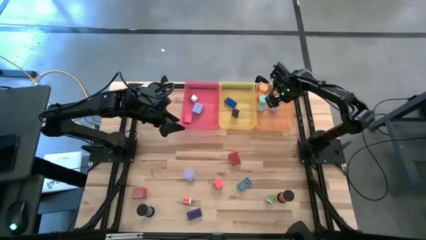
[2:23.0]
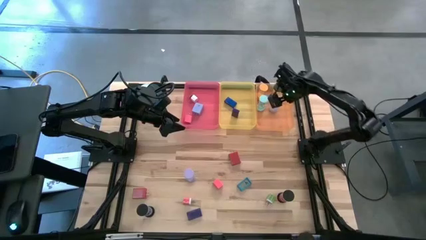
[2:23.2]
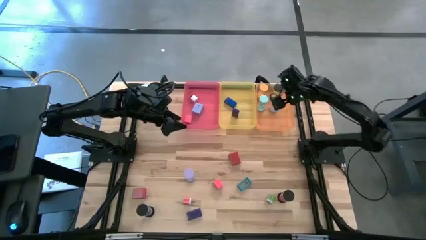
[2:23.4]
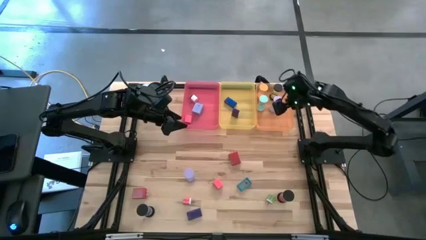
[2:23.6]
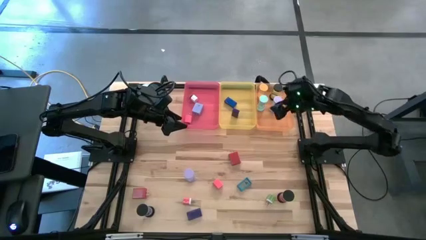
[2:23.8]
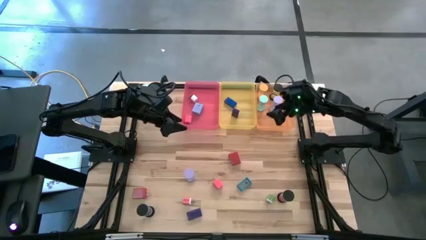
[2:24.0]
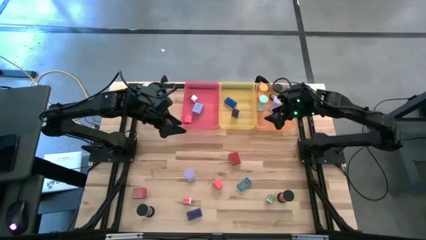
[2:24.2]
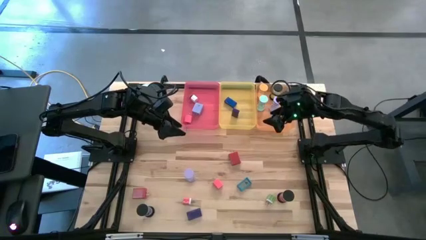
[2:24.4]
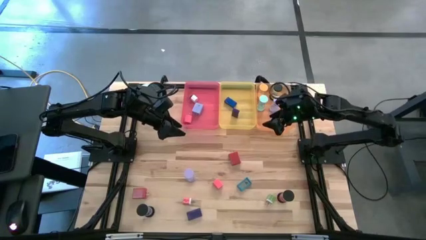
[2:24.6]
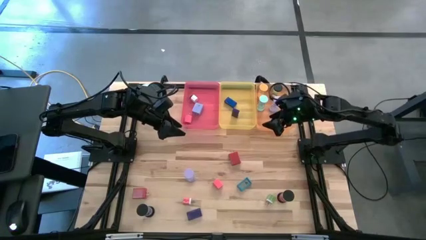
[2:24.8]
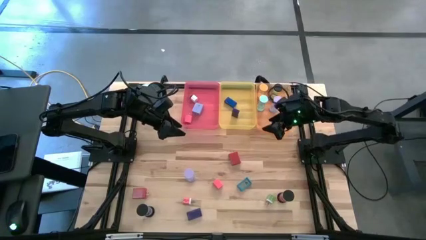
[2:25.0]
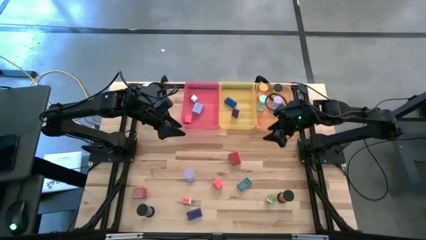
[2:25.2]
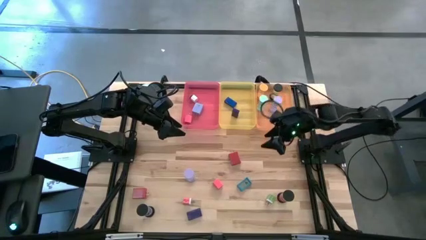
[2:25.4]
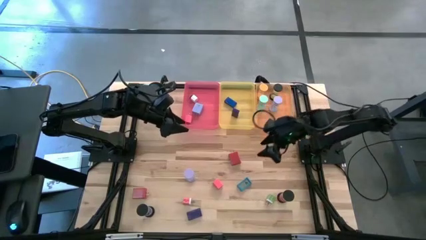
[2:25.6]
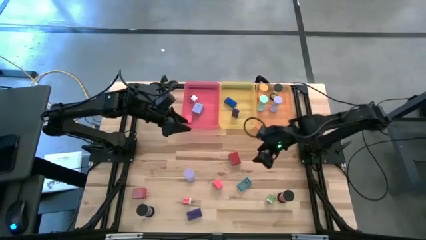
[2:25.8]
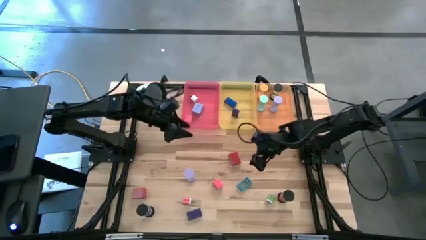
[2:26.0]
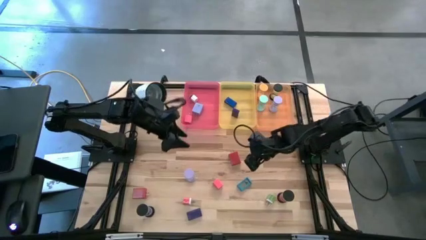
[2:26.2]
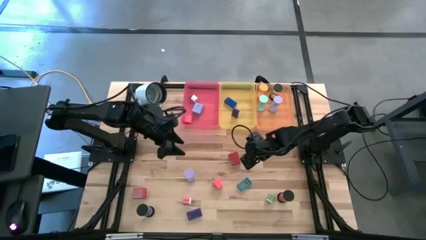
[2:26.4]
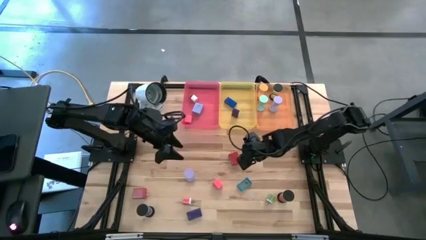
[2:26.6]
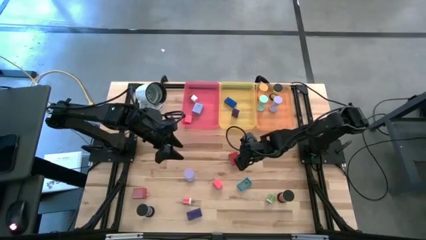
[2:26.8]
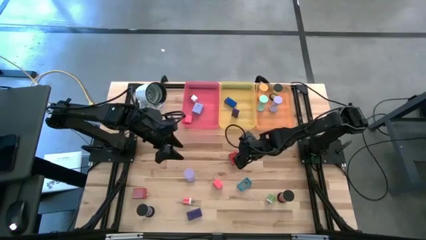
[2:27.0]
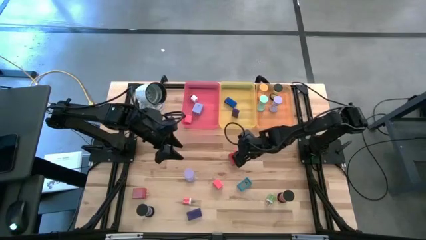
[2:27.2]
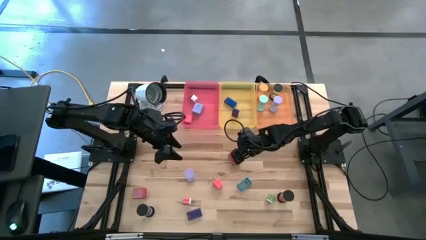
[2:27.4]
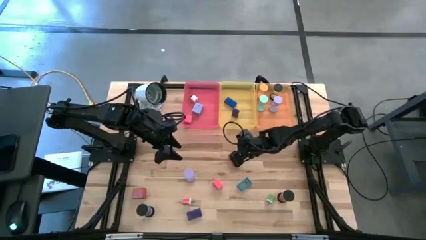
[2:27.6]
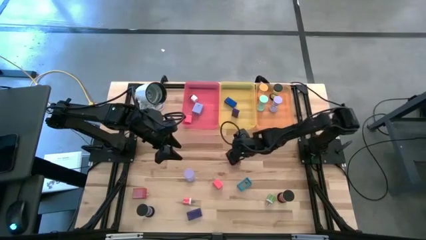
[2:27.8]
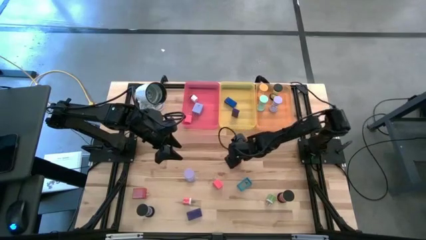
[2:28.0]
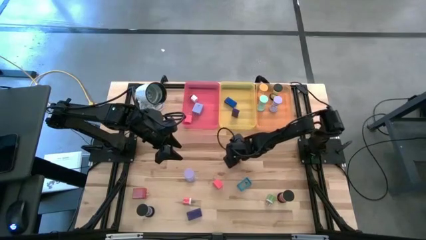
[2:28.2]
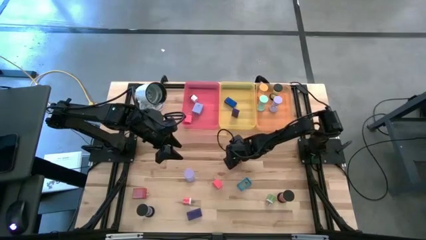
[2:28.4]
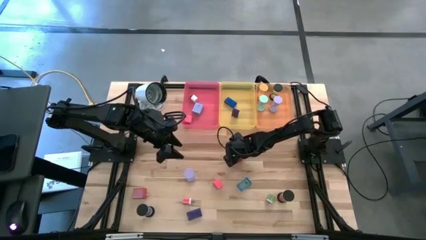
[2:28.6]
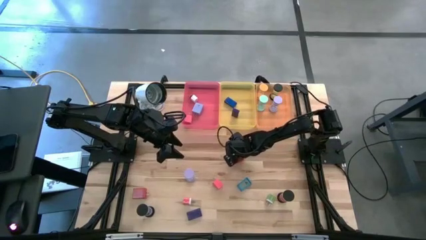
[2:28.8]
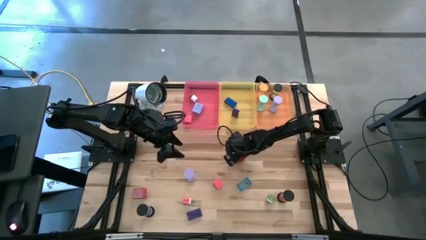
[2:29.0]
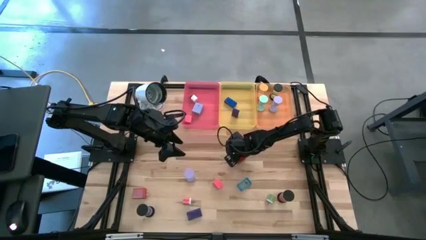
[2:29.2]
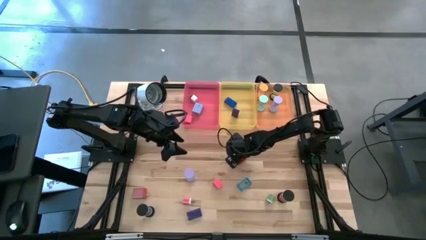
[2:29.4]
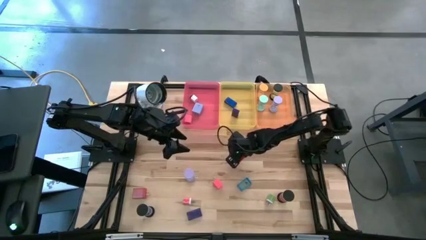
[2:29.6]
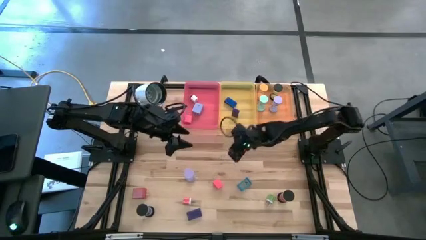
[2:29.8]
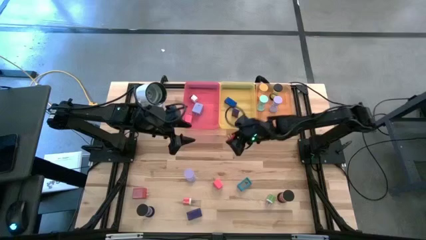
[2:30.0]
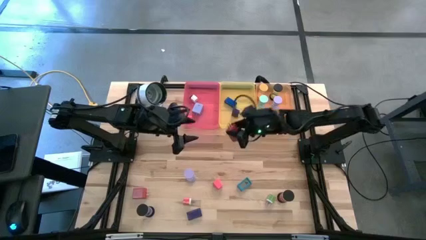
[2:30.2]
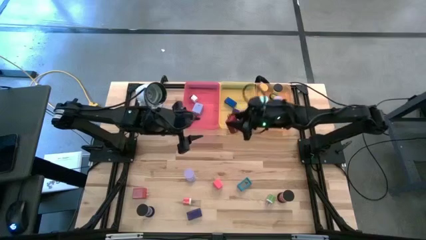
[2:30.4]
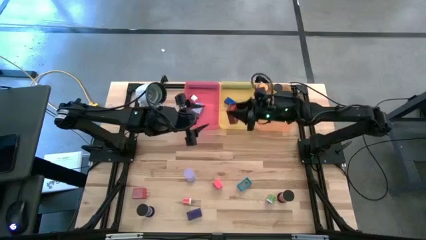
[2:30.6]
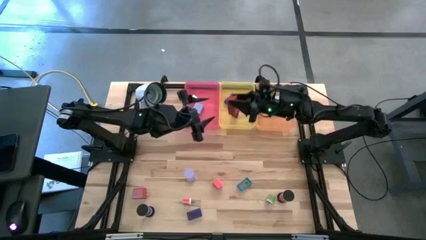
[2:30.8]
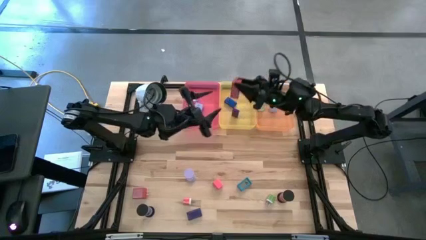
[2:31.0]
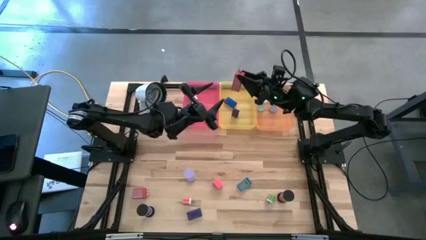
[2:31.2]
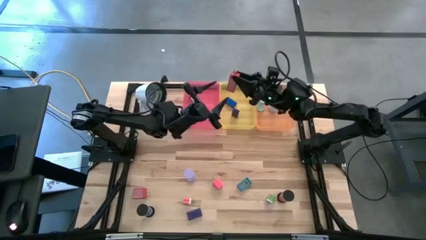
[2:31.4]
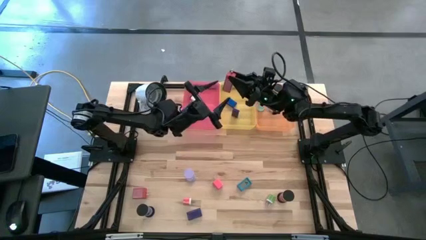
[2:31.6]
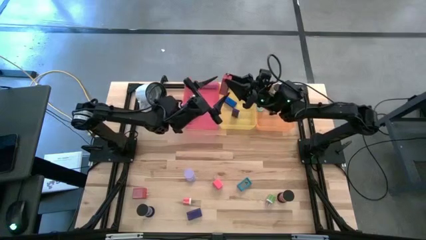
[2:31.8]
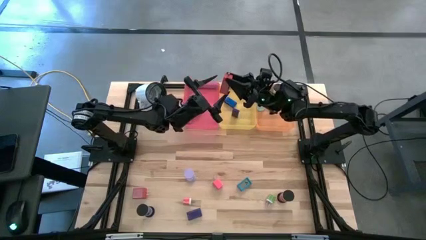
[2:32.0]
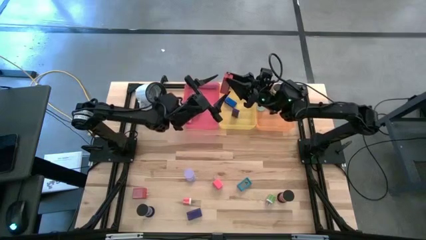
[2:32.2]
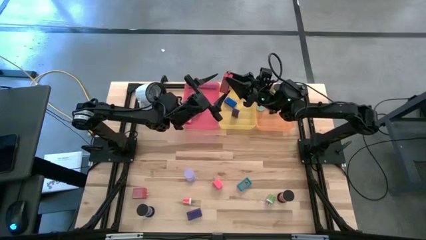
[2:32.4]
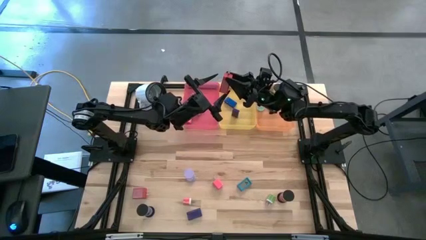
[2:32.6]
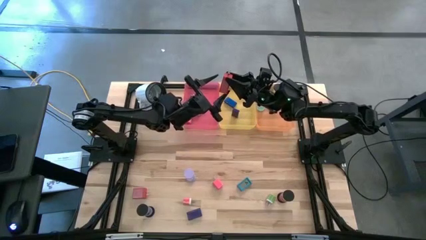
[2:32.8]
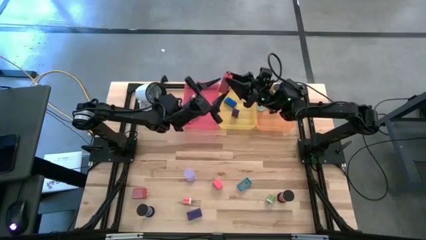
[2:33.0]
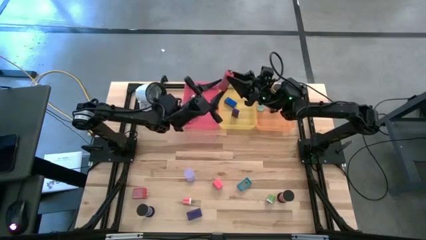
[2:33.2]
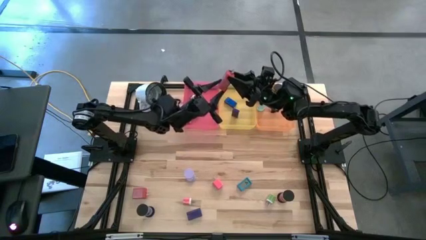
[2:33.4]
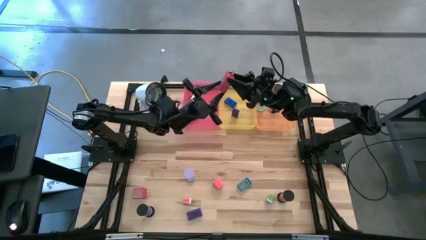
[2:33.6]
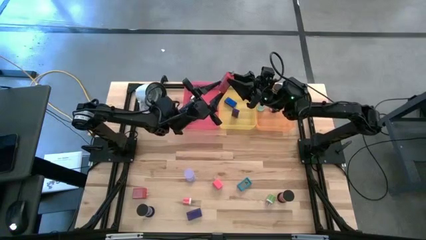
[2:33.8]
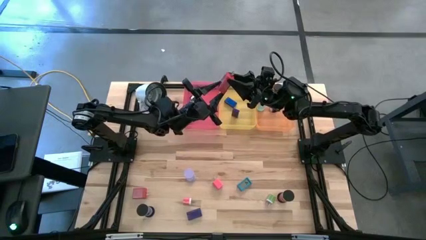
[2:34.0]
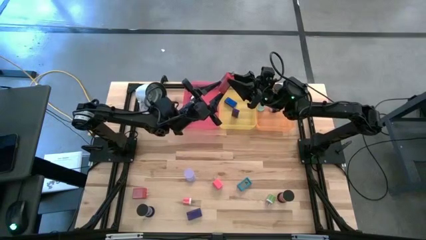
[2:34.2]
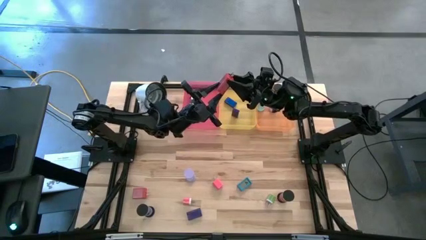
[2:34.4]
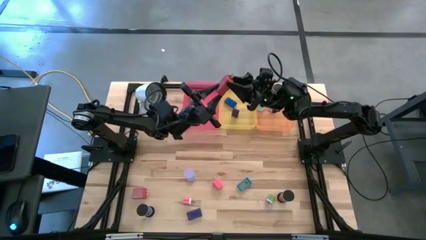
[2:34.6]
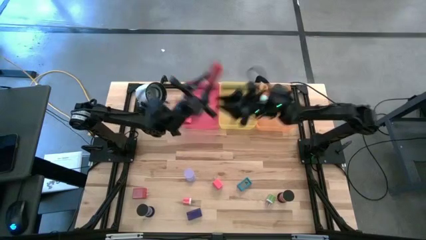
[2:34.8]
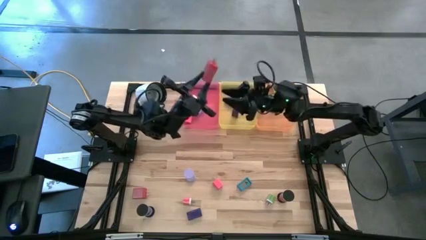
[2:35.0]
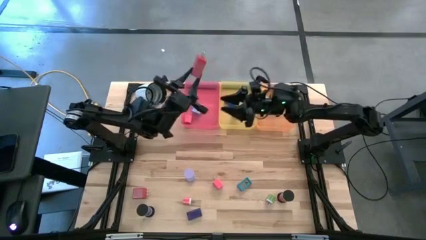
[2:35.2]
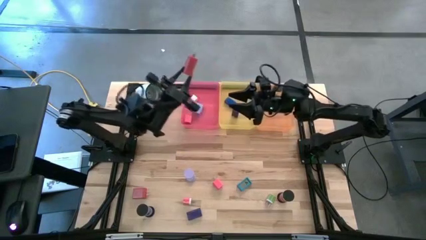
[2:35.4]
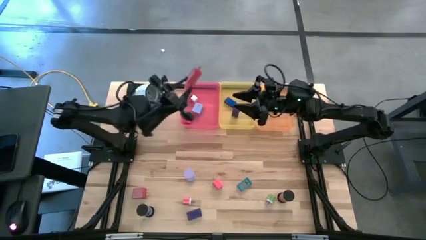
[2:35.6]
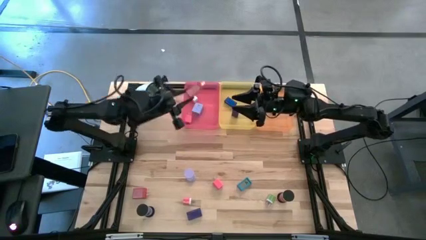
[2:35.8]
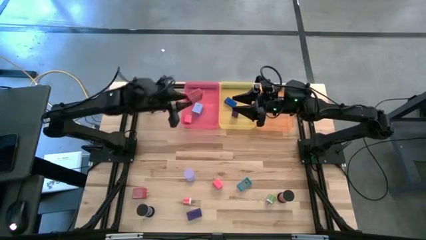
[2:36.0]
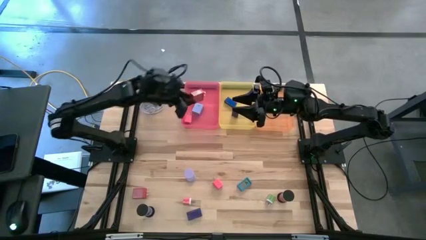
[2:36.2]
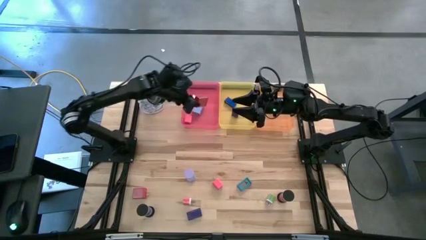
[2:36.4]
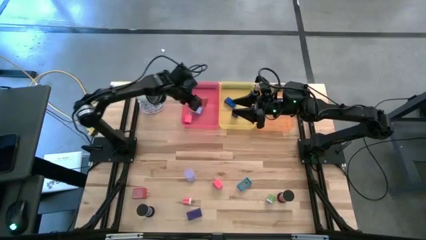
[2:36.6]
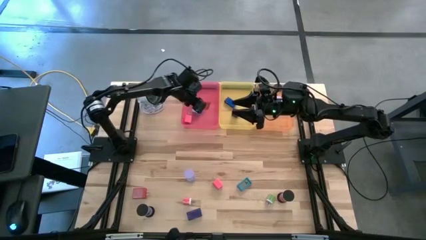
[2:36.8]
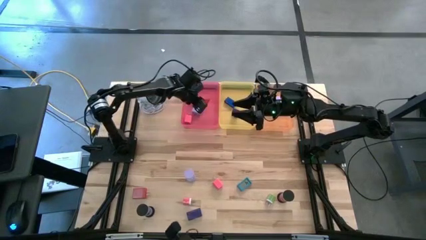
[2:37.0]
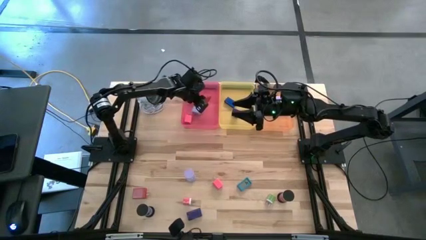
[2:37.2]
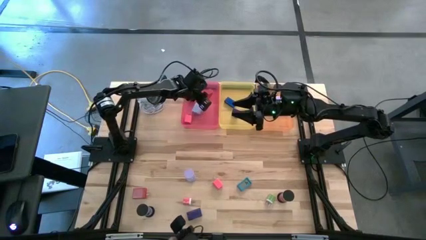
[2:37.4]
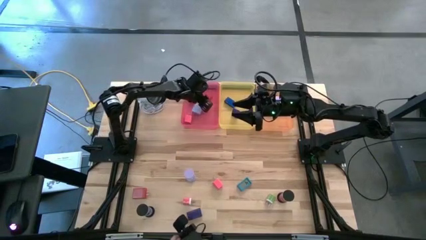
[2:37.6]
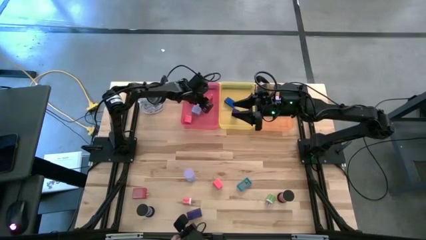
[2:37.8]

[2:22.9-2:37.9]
Task: Pick & Place Office items
Put the top red charger adapter into the red bin

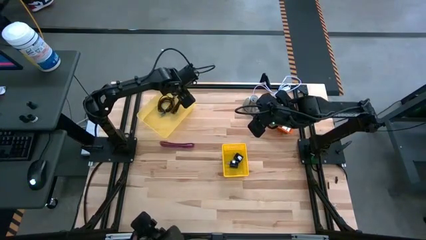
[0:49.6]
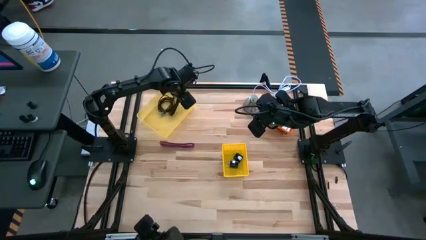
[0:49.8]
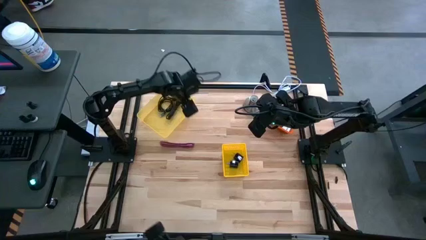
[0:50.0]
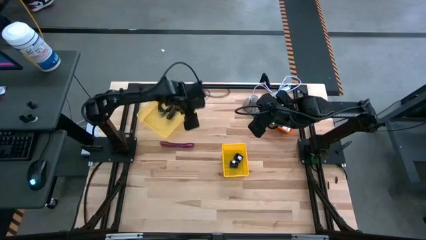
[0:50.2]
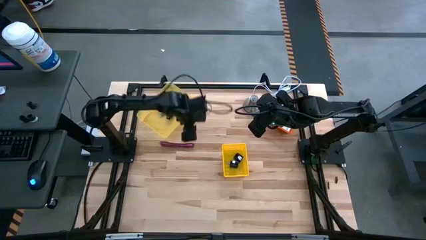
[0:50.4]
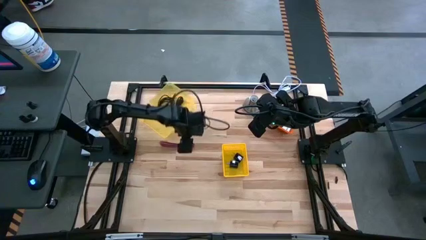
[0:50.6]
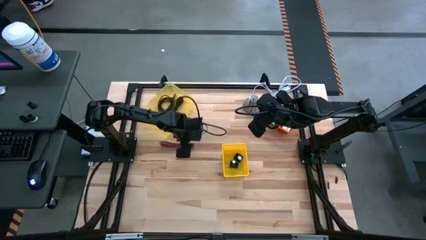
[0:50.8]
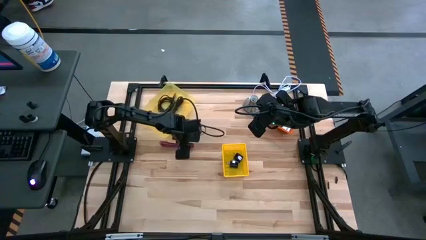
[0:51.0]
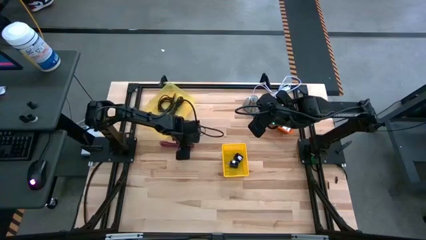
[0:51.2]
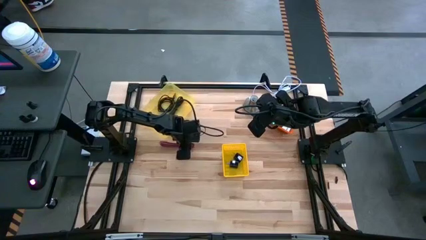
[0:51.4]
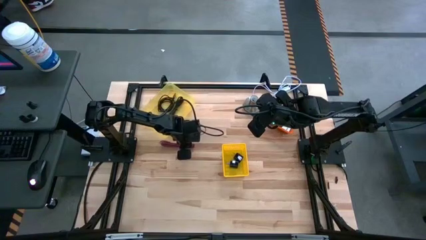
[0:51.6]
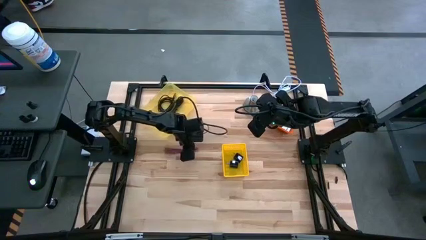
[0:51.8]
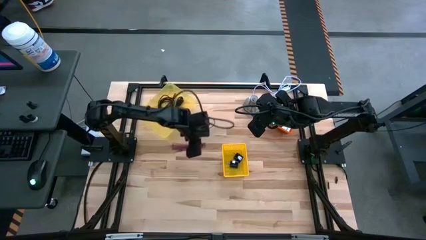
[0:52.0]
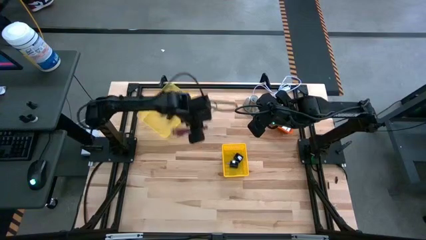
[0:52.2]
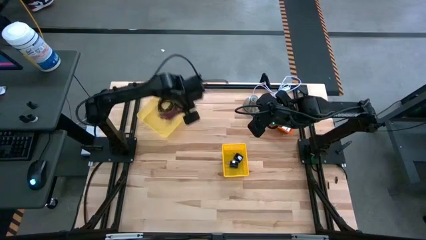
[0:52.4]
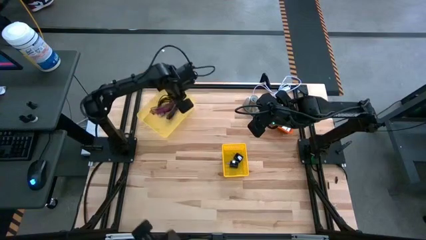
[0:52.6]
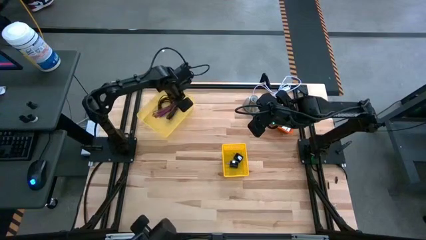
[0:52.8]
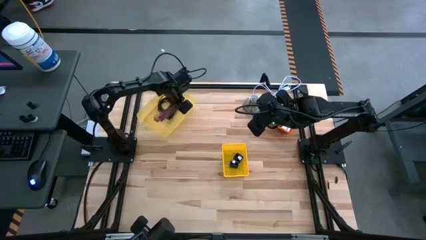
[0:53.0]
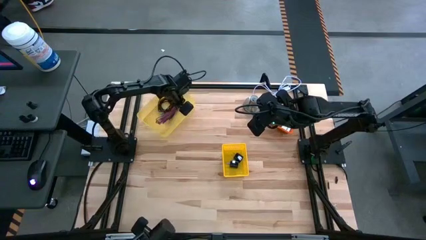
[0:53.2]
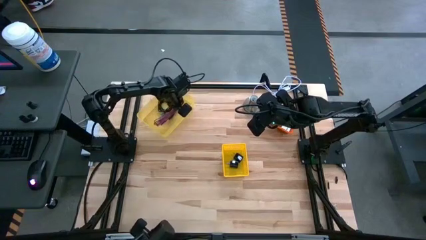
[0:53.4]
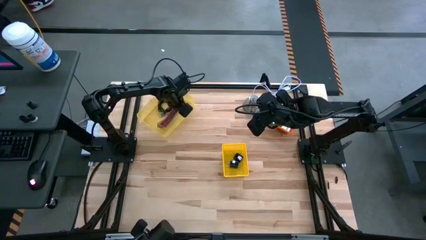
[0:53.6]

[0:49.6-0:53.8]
Task: Pick and place items into bin
Put the pink charger cable into the light yellow bin
